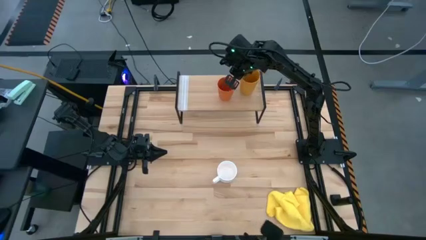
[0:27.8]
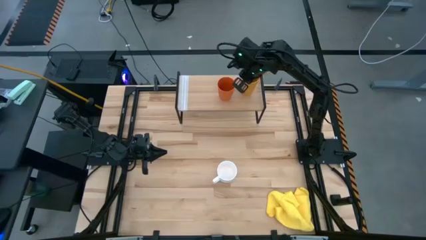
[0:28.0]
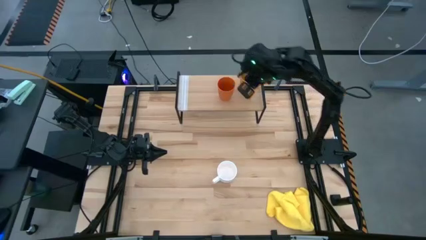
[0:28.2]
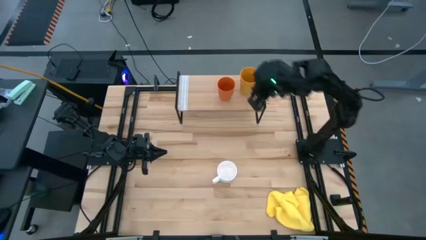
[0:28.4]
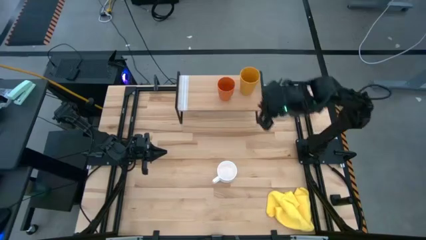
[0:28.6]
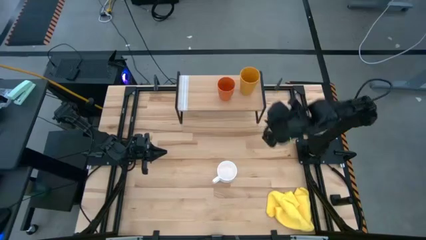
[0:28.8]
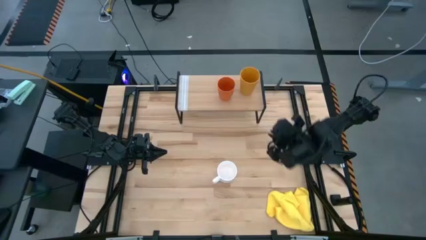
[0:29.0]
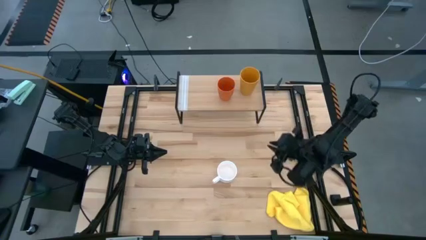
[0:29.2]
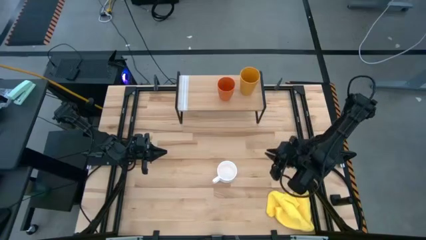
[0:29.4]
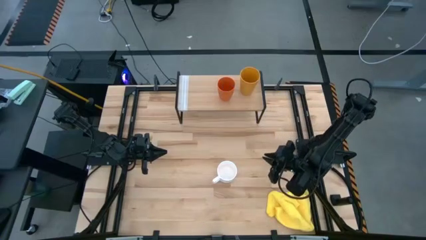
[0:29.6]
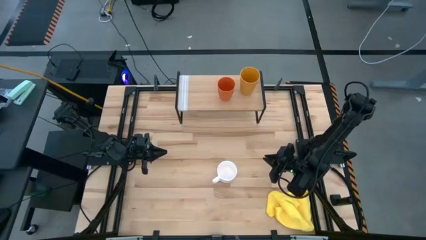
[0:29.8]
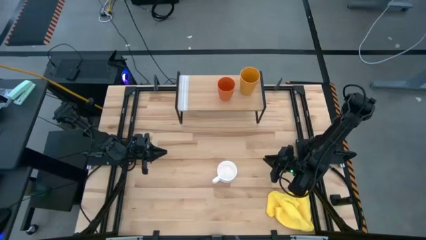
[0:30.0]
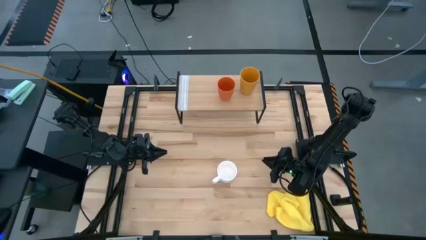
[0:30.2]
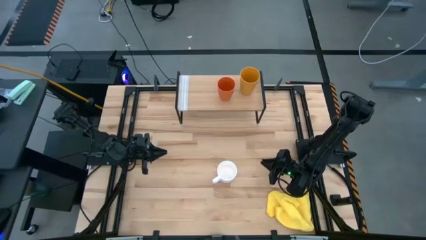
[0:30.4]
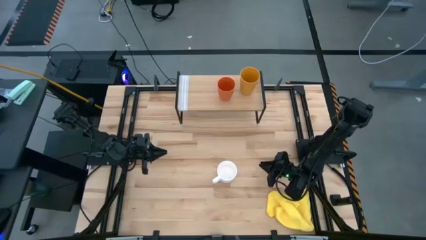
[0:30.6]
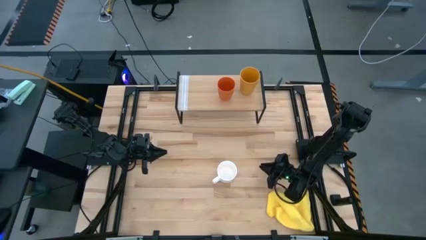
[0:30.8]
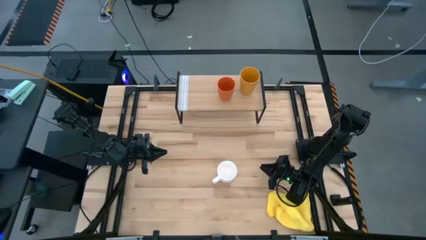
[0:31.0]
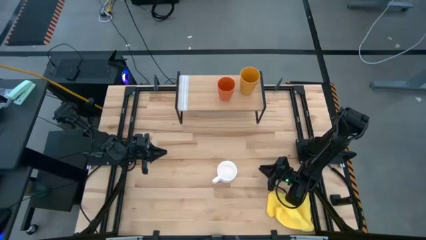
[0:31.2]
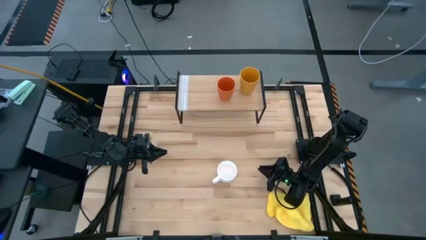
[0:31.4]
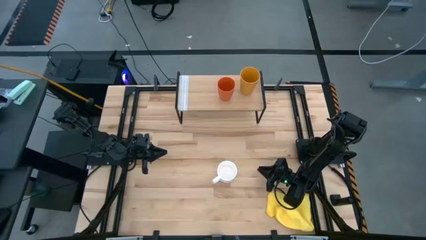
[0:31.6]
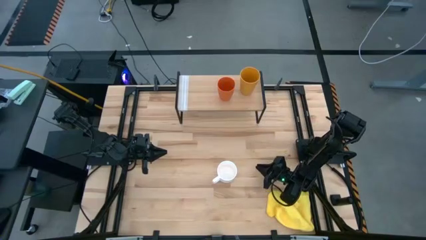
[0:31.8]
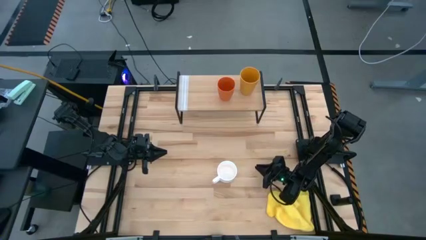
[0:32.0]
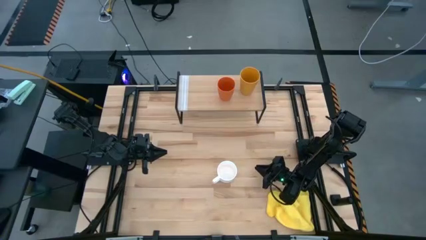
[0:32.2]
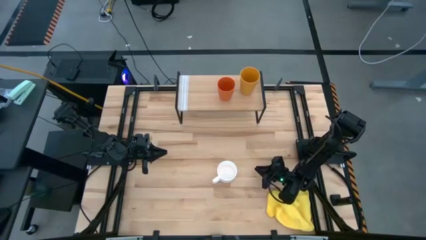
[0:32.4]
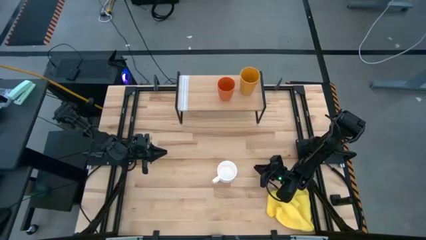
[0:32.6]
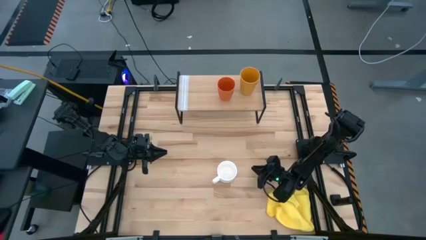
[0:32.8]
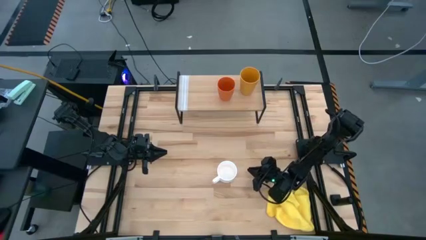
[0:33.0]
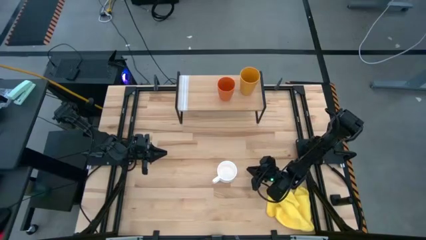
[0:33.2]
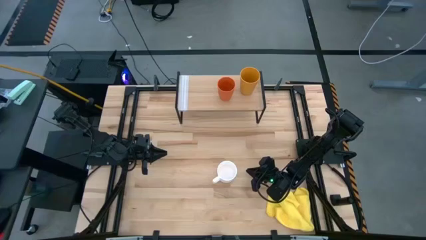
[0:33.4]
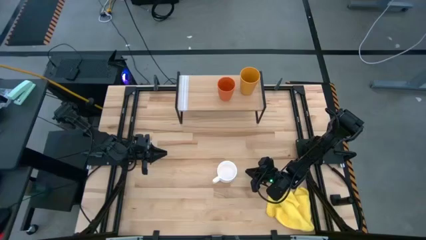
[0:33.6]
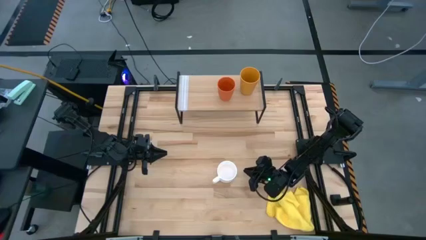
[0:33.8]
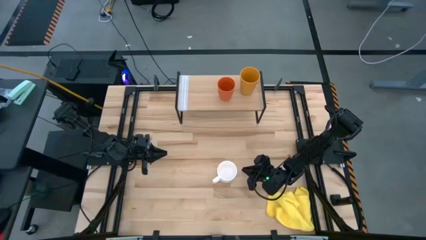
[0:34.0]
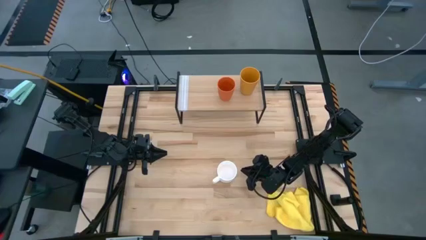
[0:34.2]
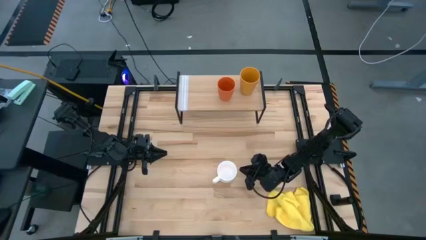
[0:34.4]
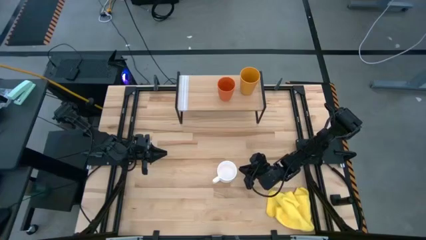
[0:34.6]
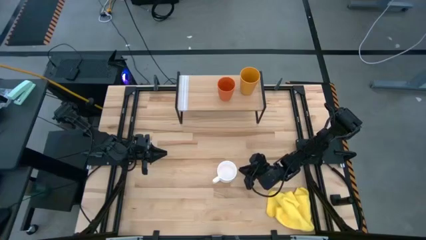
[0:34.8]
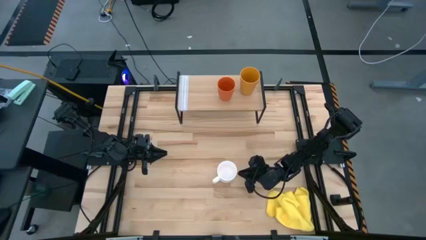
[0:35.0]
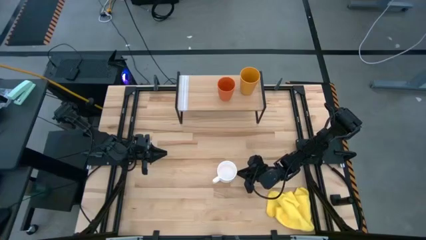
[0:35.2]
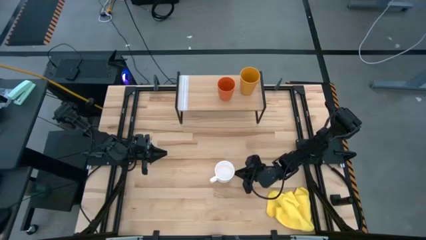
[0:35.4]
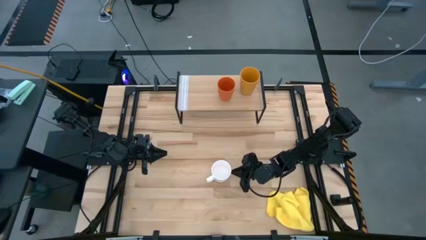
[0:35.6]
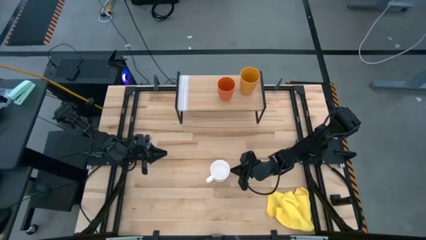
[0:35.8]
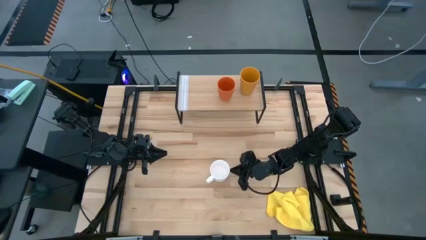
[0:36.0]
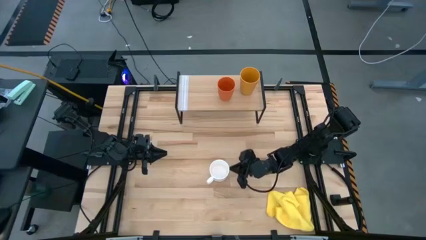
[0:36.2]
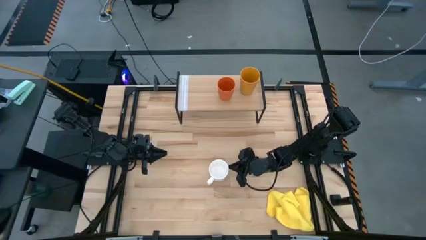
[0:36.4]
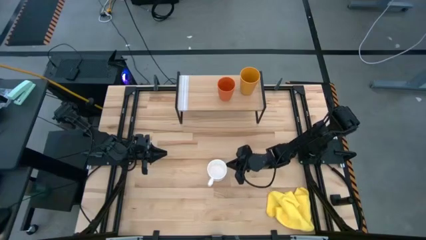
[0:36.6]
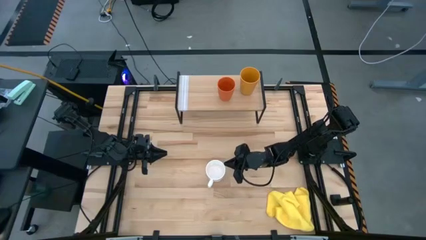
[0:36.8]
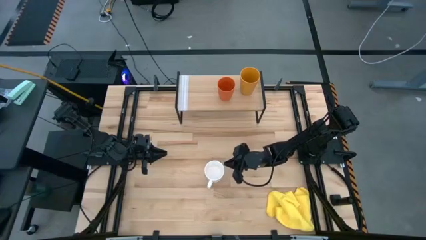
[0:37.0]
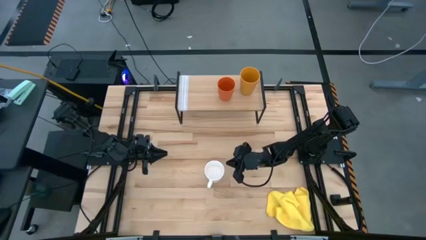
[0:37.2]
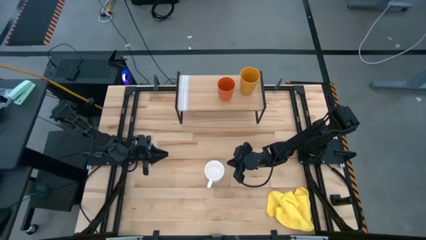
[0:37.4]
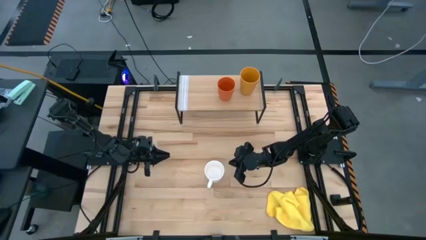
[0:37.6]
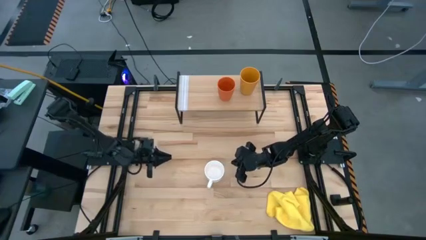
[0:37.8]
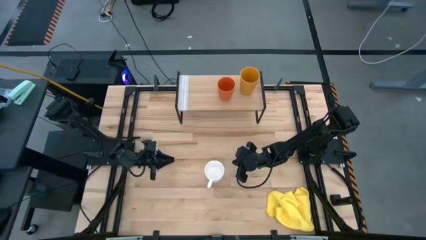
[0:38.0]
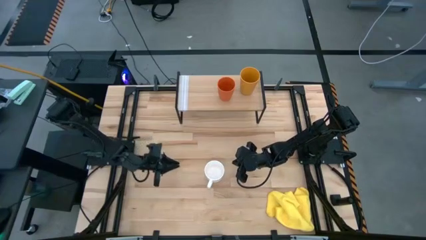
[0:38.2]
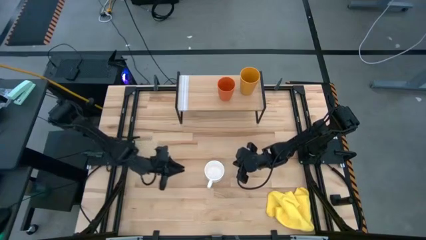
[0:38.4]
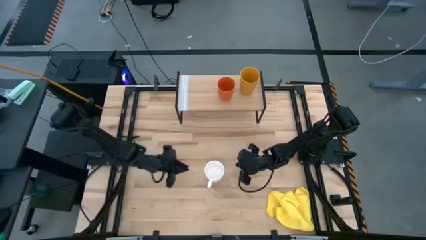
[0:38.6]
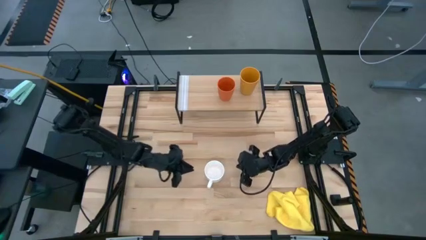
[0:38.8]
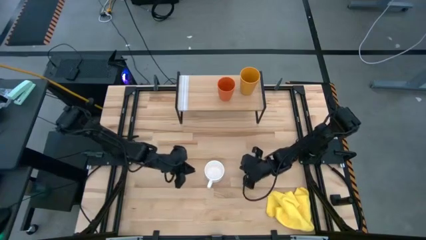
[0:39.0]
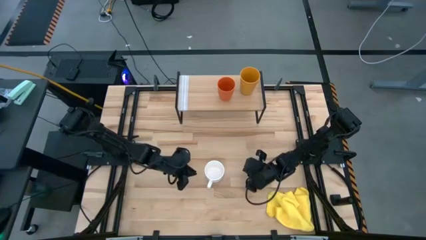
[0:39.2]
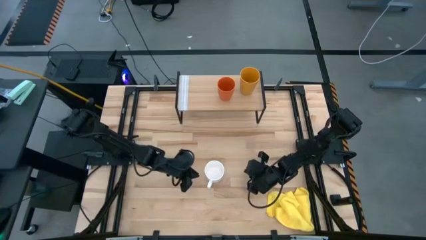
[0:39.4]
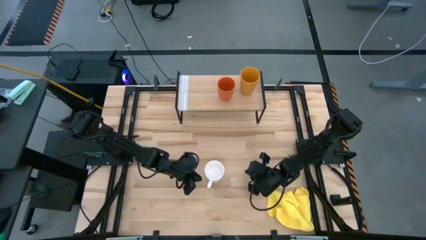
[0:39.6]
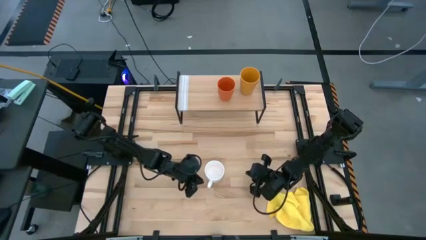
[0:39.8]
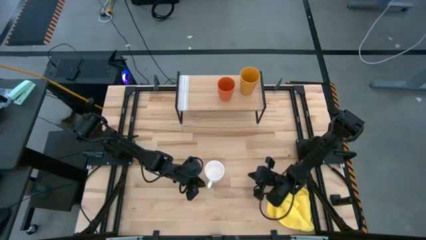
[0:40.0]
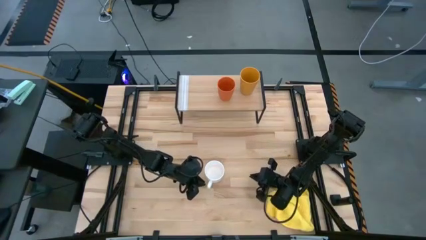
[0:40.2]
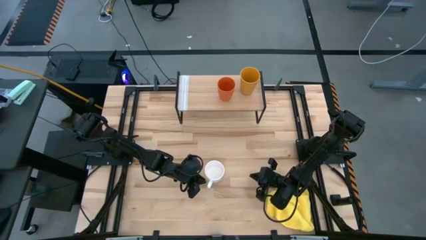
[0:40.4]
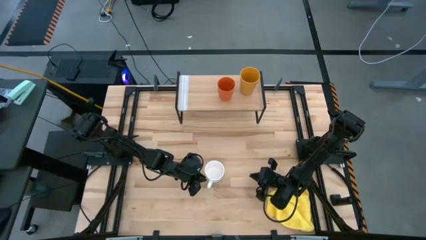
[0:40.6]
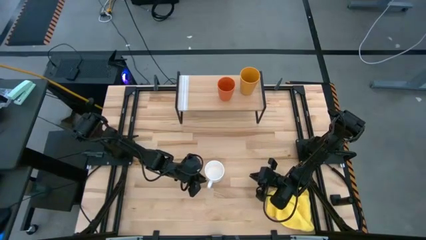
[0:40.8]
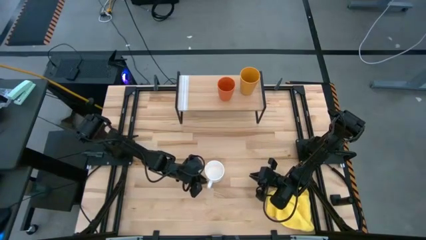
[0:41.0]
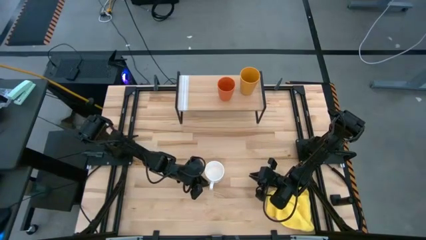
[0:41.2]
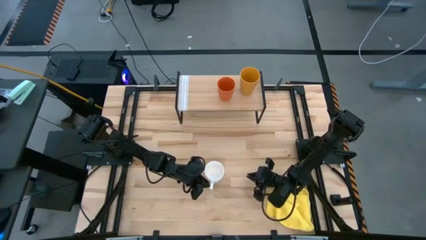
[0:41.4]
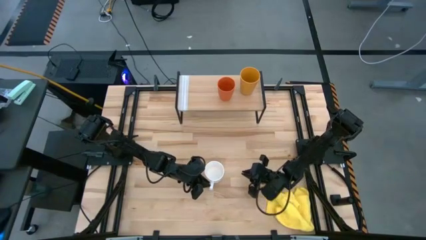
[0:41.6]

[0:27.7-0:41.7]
Task: Stack small to large cups/mugs on shelf
Put the white mug on the shelf
